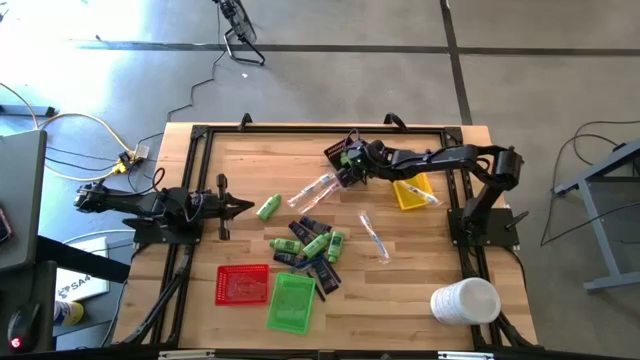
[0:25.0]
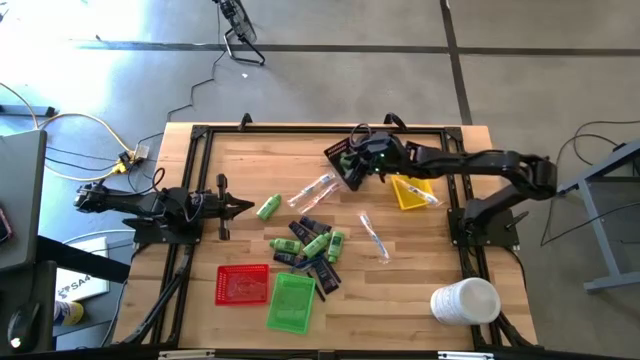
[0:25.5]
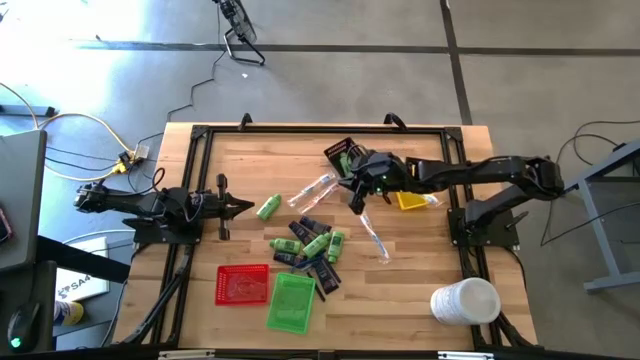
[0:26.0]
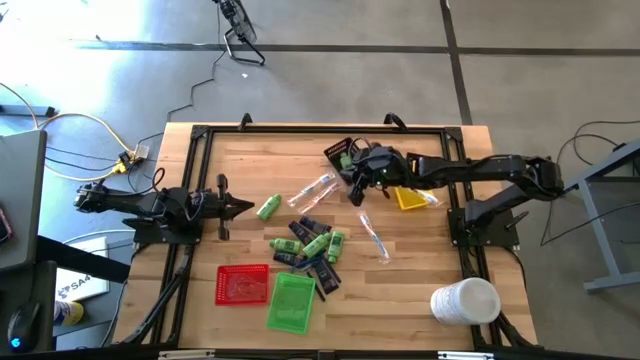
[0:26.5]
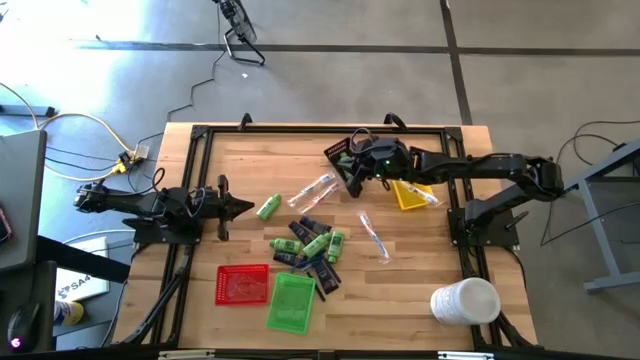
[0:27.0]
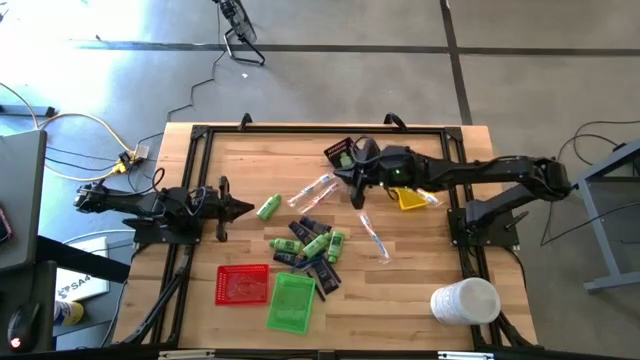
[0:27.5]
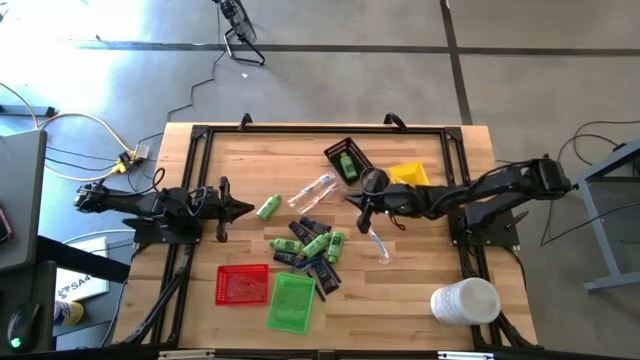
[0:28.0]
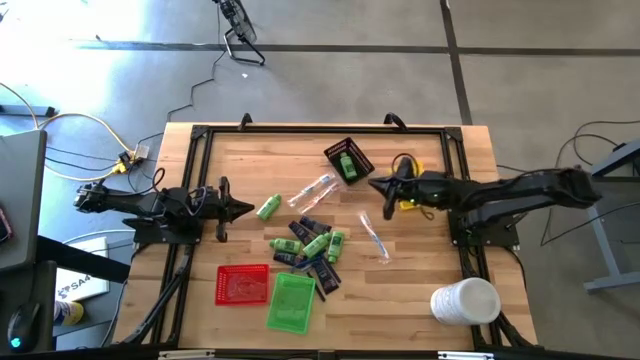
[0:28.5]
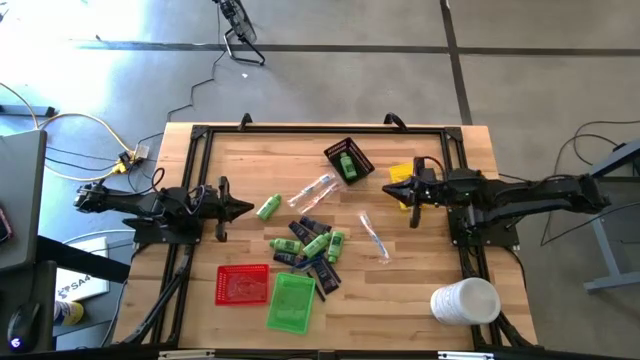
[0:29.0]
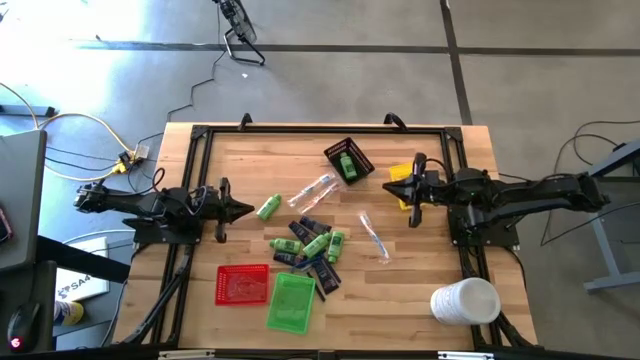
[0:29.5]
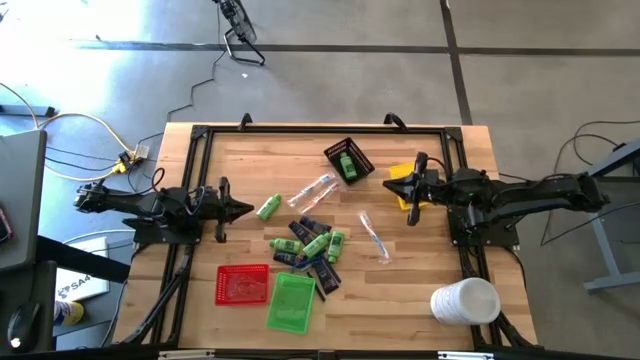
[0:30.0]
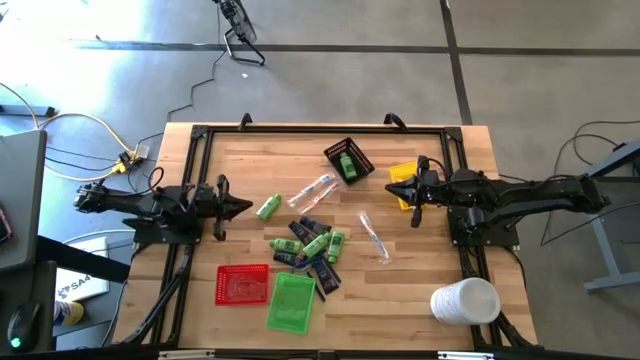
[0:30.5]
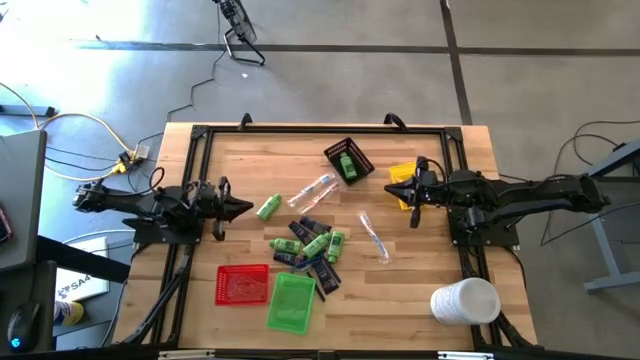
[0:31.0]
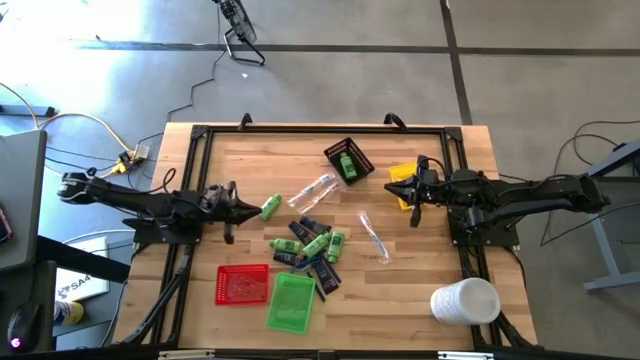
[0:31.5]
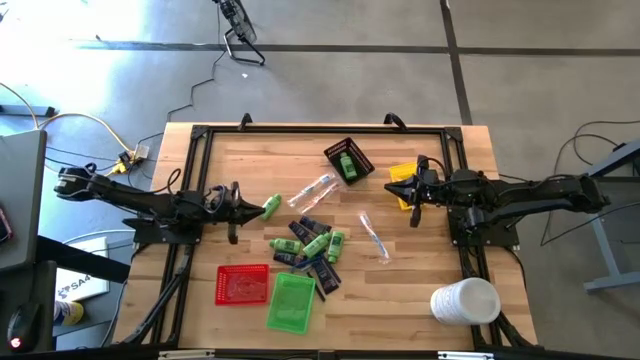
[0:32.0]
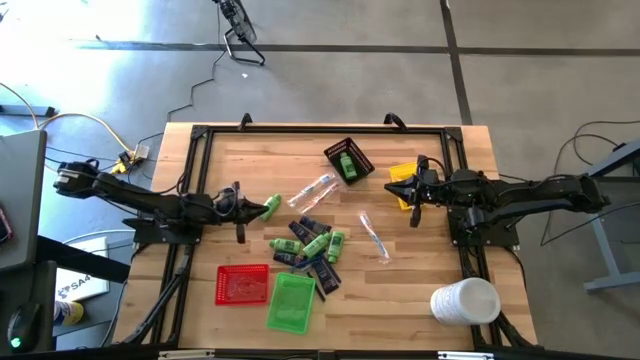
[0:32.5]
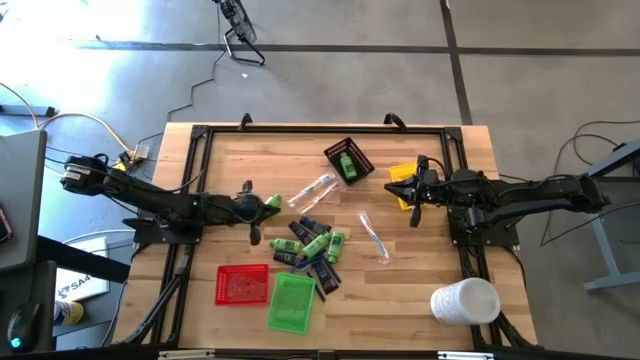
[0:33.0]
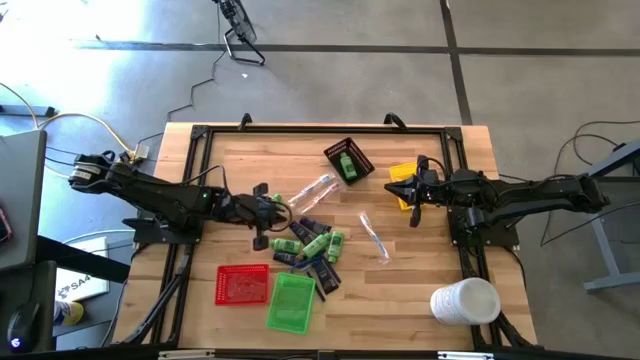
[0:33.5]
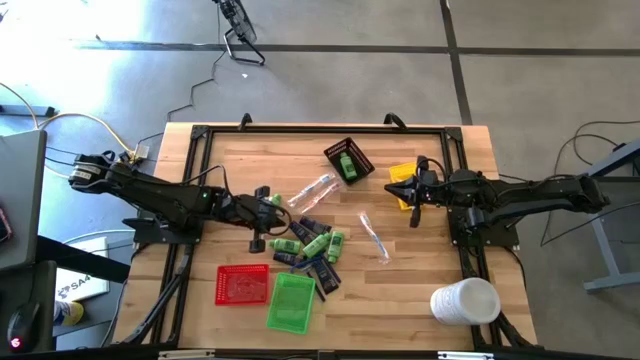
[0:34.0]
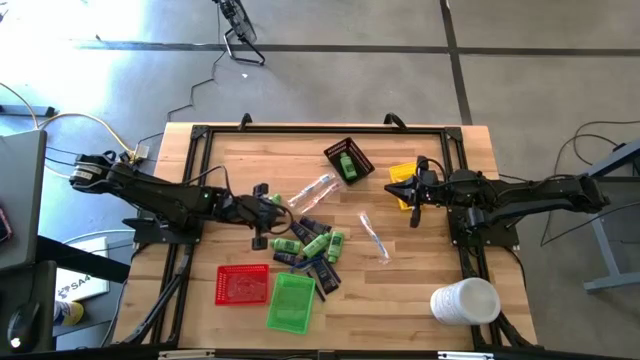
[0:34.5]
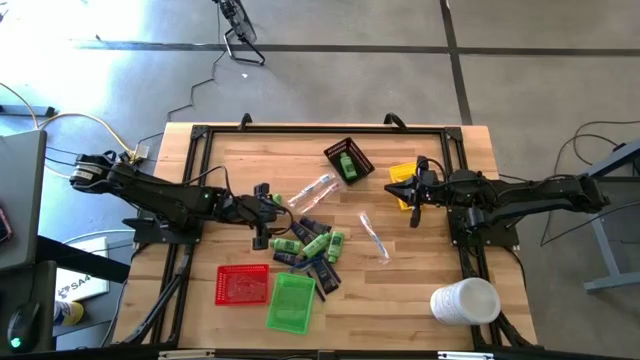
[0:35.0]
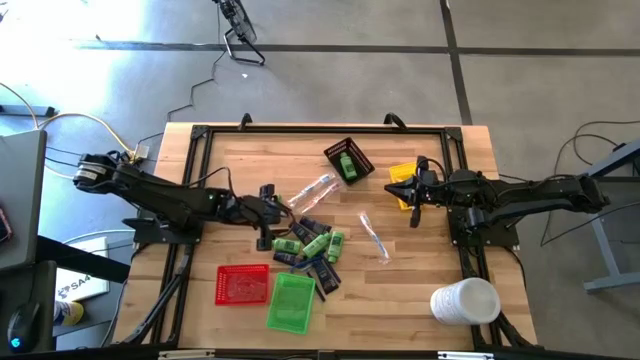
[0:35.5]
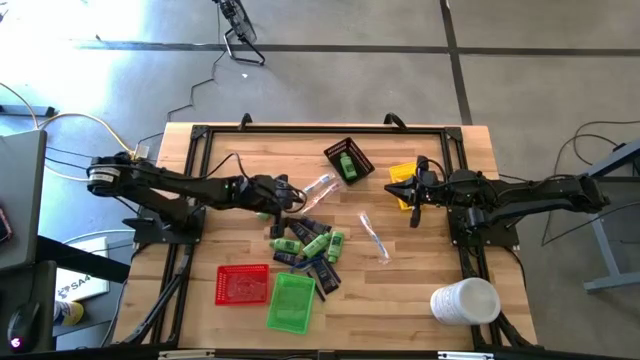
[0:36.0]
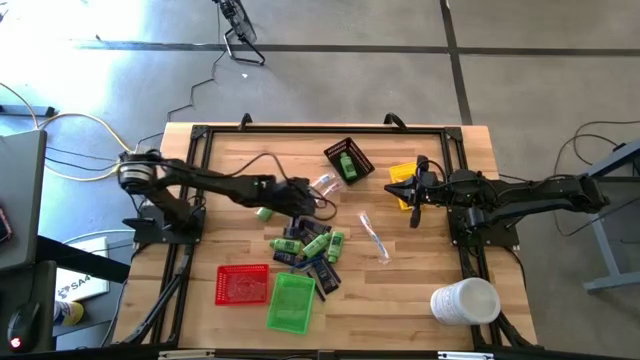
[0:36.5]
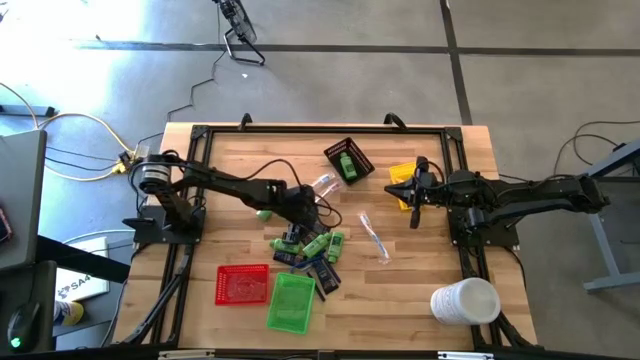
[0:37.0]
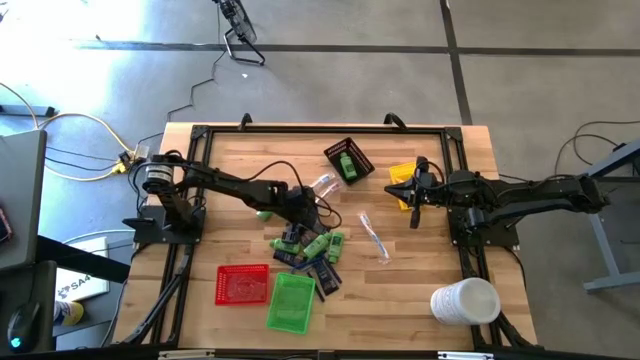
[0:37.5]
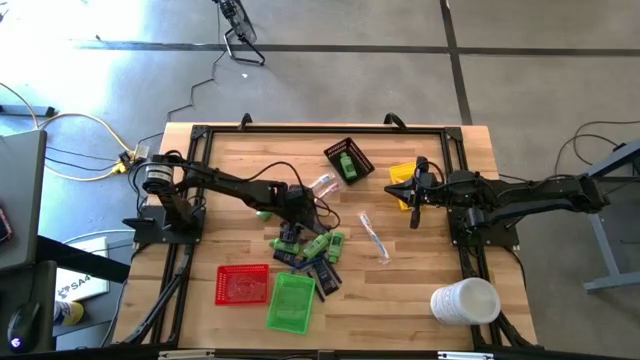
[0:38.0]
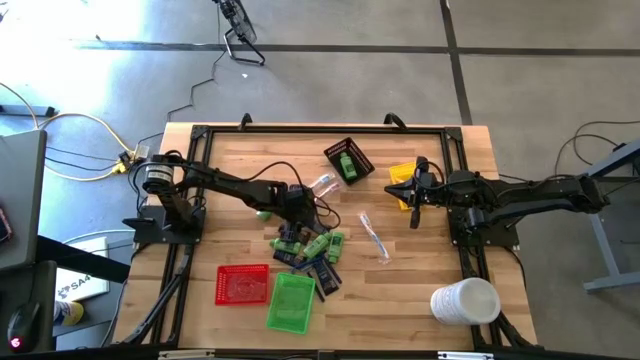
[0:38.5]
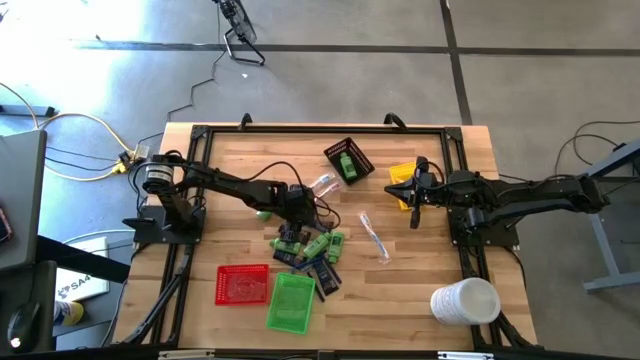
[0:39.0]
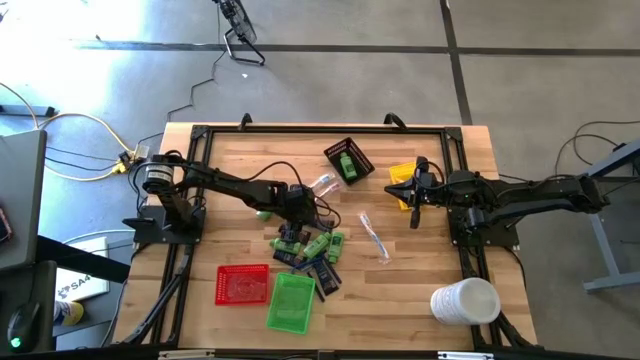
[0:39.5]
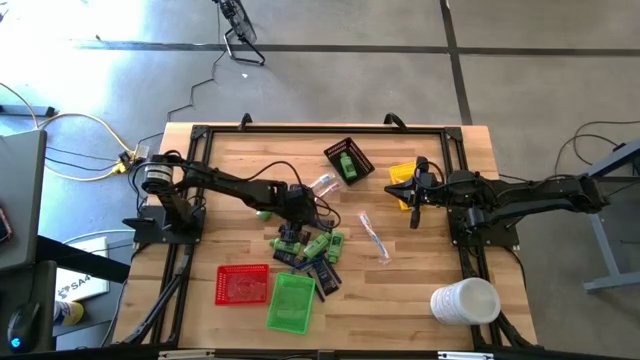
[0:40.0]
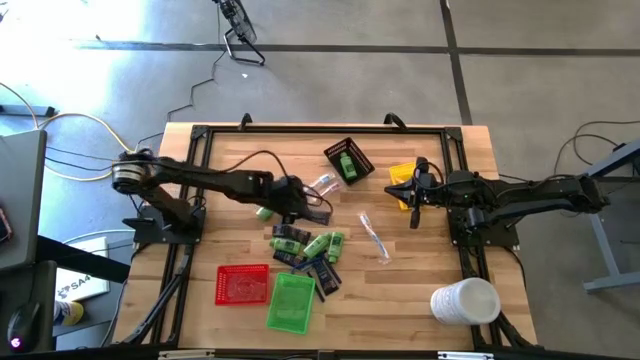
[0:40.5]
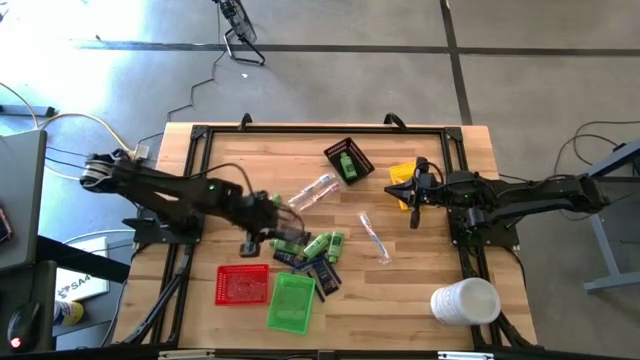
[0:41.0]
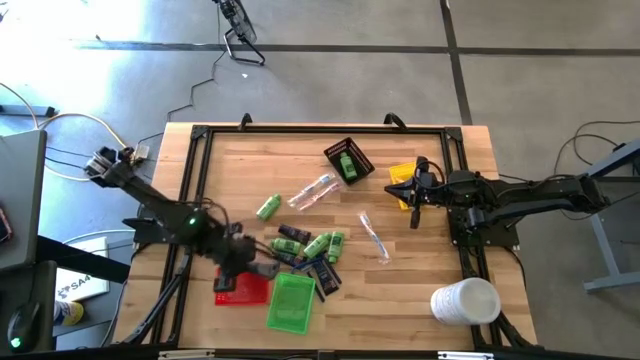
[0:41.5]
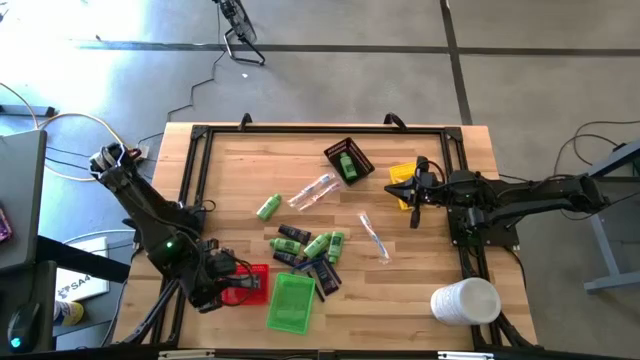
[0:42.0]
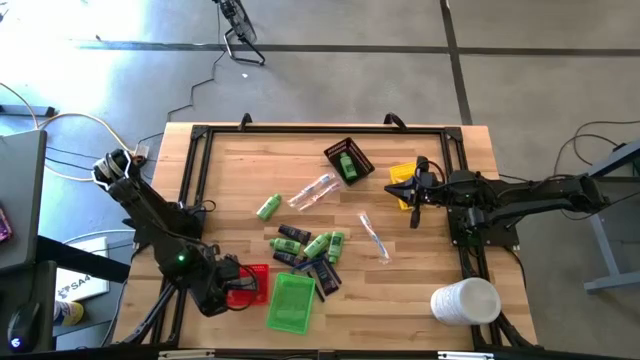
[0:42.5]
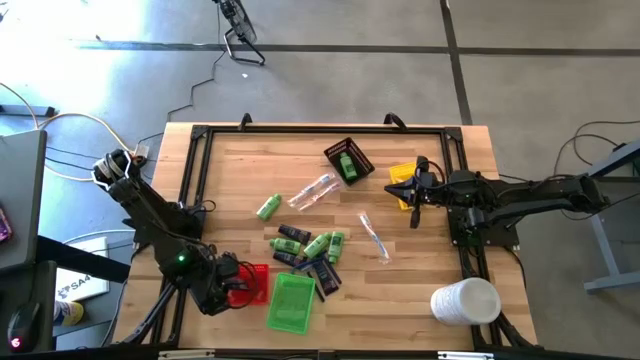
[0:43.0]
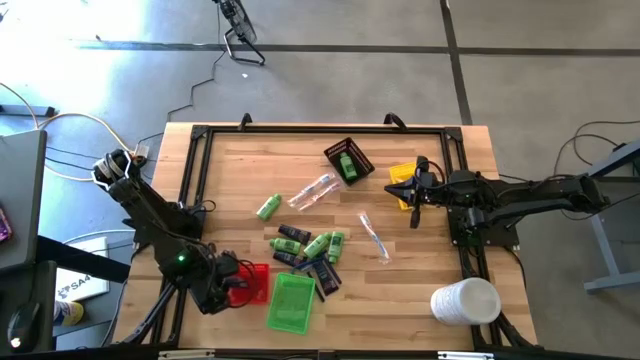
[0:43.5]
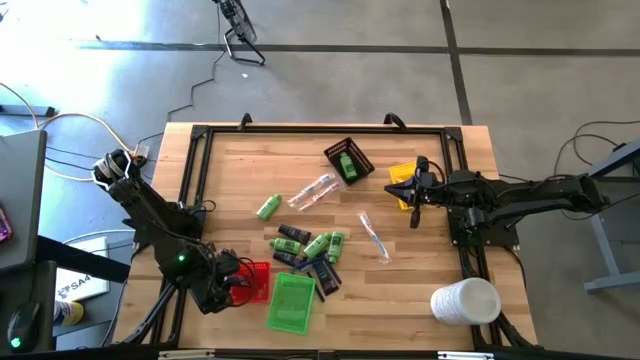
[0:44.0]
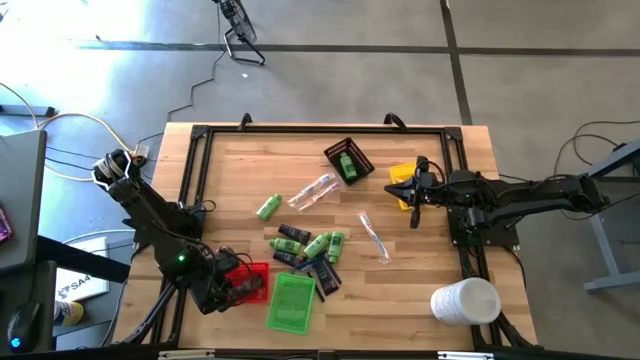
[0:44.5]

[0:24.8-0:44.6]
Task: Pick & Place Travel size toiletries
Put the shave cream into the red bin

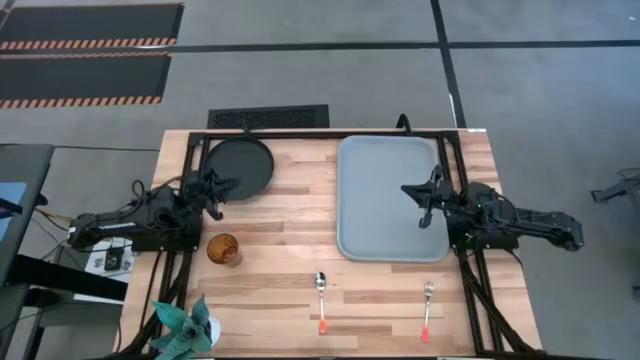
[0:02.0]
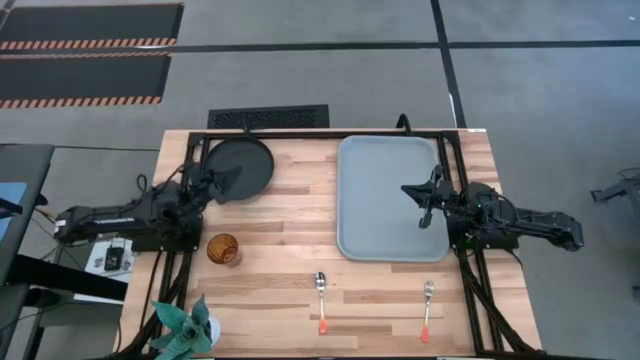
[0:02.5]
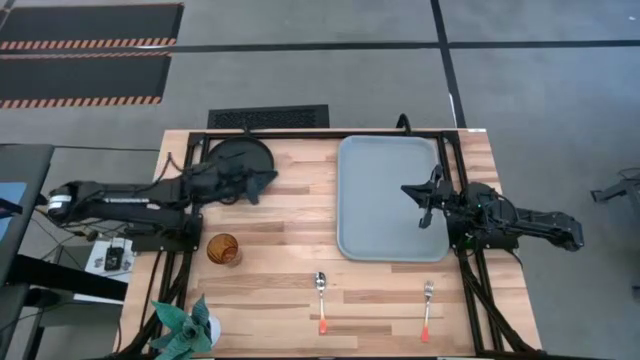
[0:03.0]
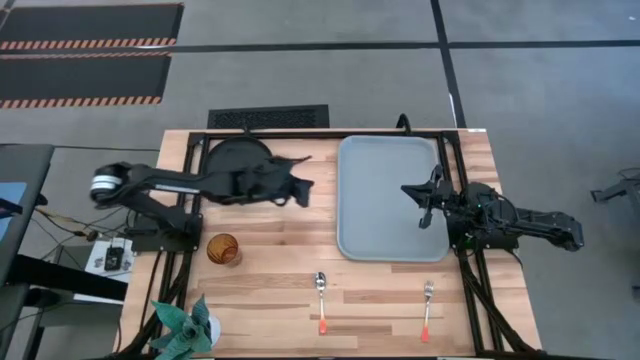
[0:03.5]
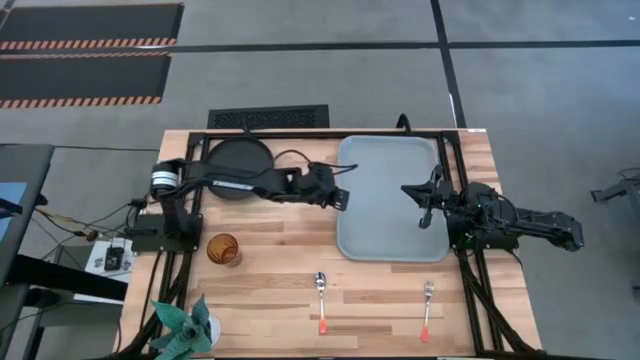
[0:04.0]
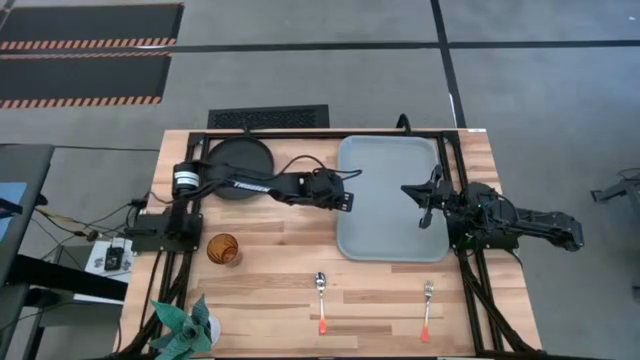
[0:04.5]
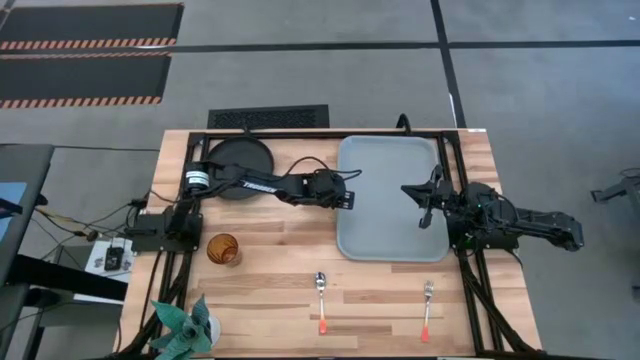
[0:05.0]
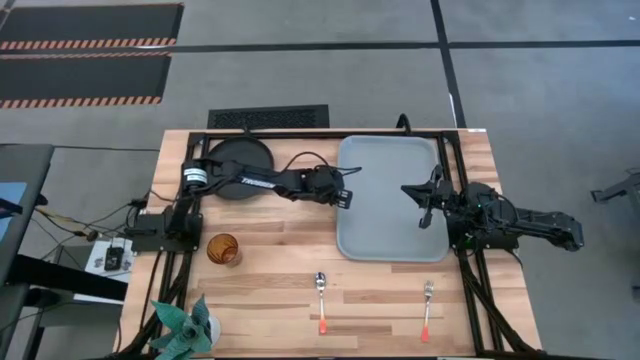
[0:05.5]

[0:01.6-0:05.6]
Task: Pick and place plate/cup/fork/spoon on tray
Prepare the gray tray in the center of the table
